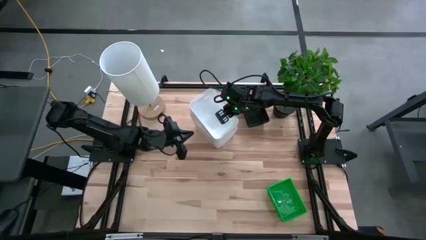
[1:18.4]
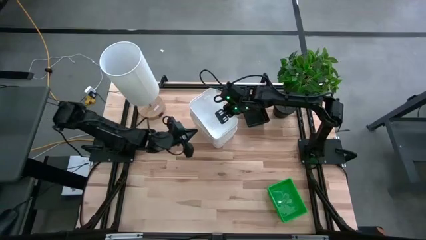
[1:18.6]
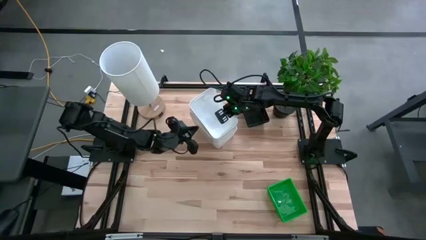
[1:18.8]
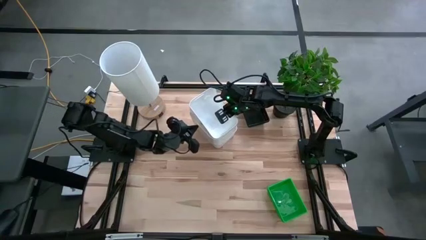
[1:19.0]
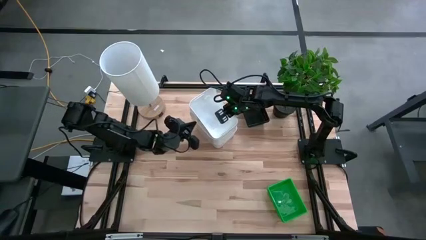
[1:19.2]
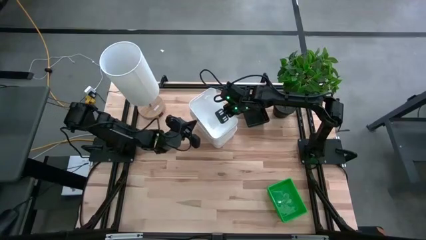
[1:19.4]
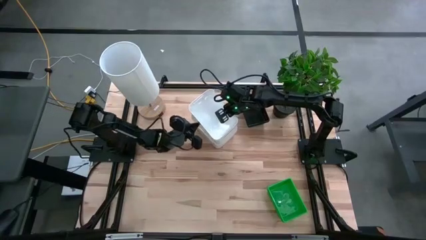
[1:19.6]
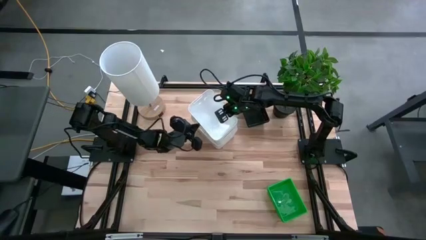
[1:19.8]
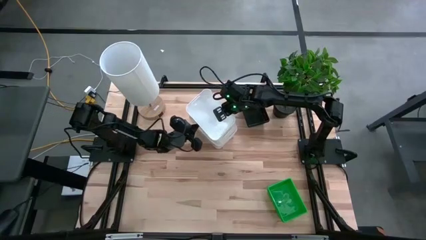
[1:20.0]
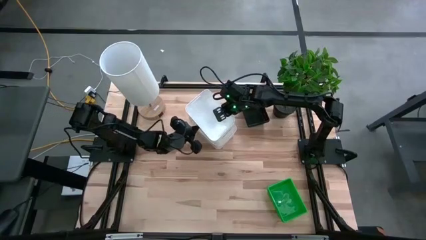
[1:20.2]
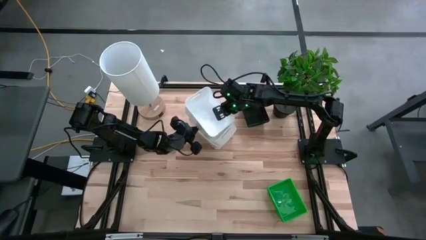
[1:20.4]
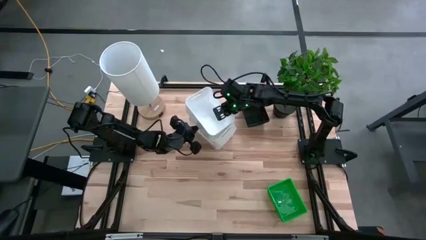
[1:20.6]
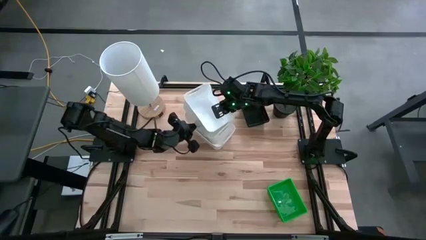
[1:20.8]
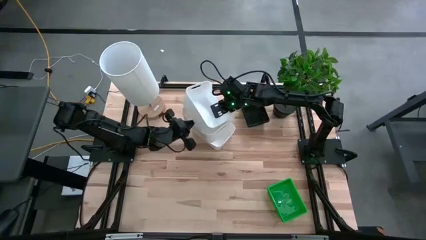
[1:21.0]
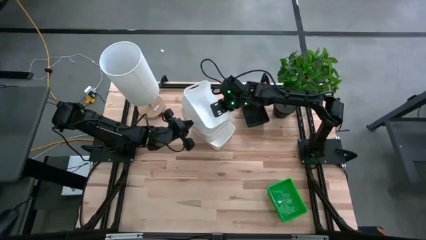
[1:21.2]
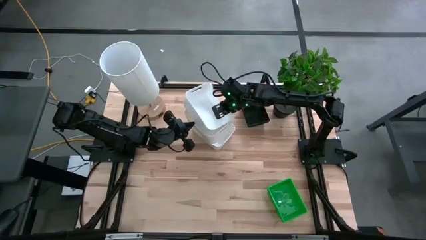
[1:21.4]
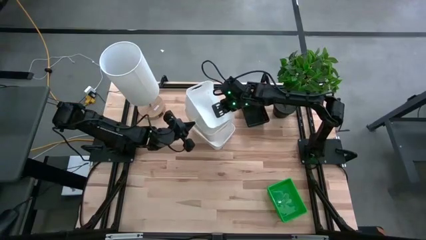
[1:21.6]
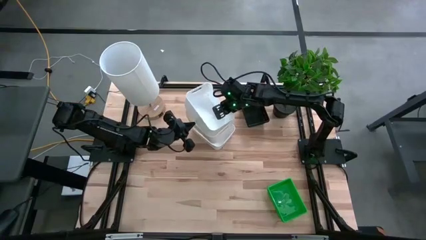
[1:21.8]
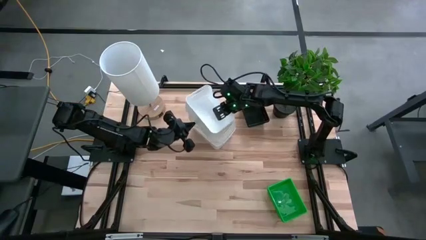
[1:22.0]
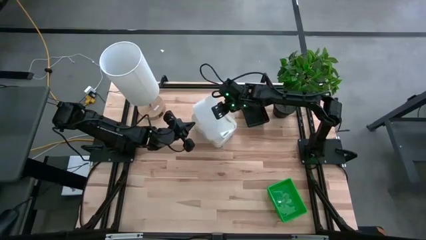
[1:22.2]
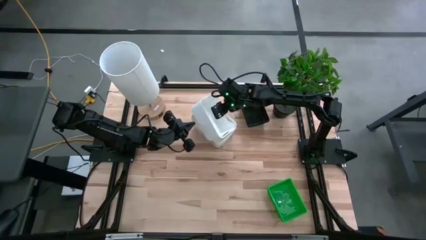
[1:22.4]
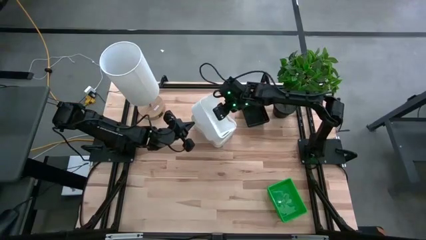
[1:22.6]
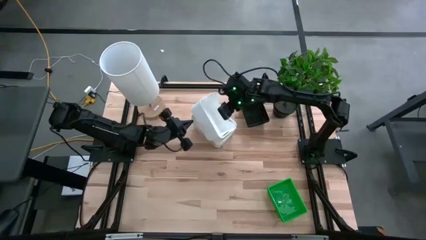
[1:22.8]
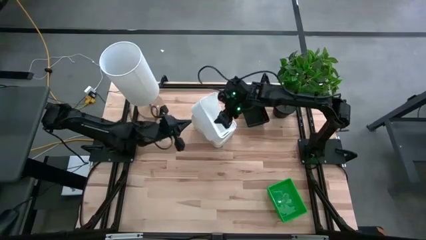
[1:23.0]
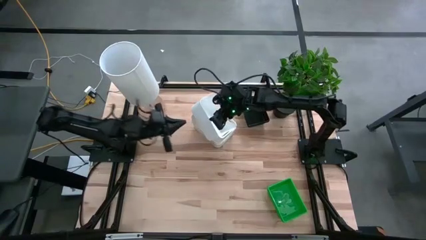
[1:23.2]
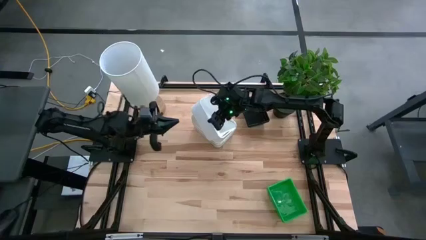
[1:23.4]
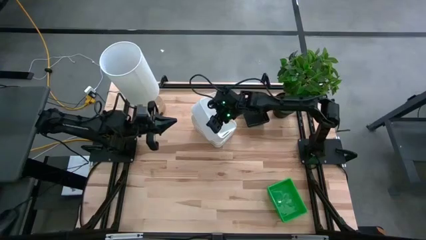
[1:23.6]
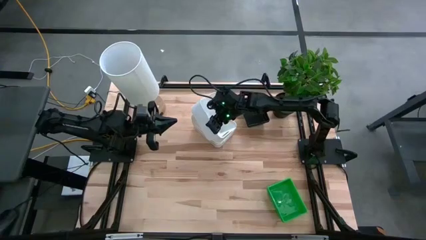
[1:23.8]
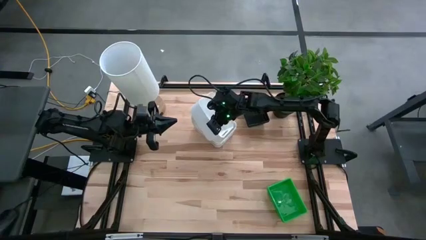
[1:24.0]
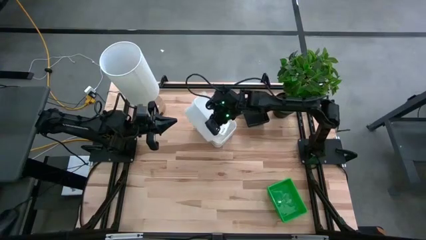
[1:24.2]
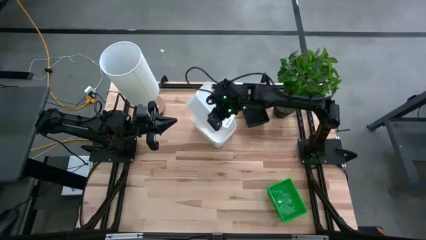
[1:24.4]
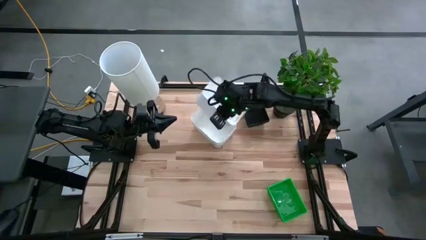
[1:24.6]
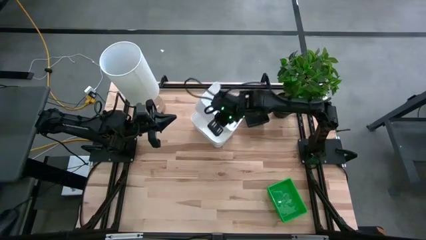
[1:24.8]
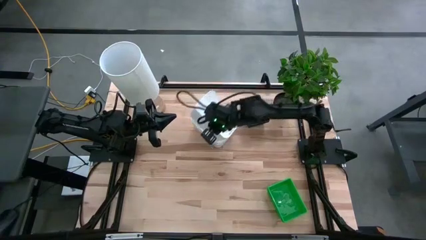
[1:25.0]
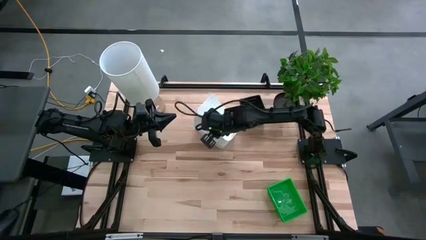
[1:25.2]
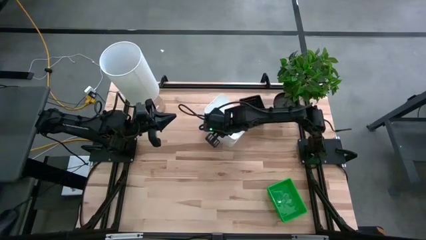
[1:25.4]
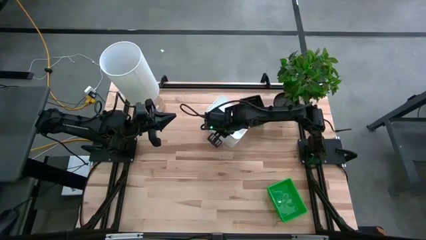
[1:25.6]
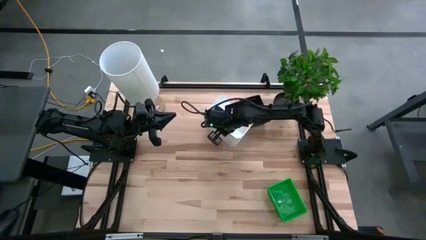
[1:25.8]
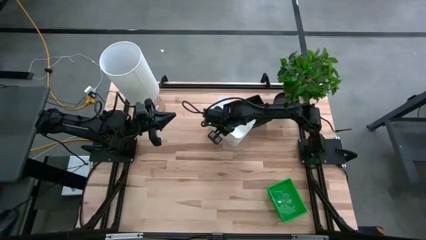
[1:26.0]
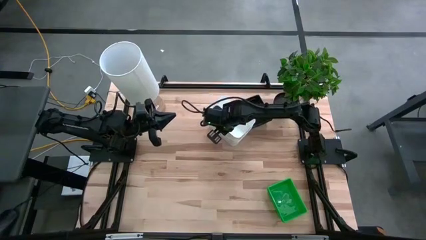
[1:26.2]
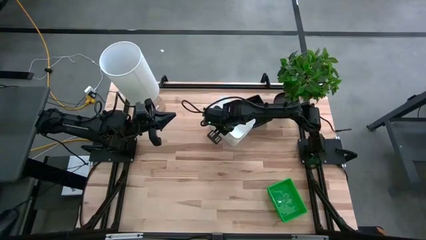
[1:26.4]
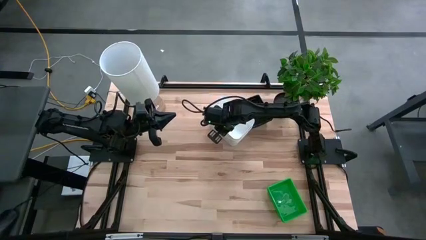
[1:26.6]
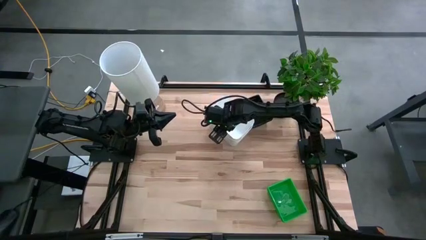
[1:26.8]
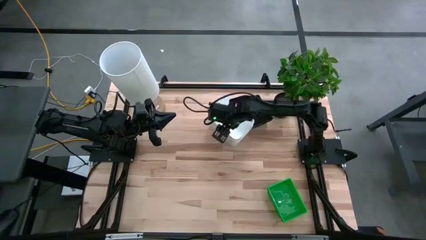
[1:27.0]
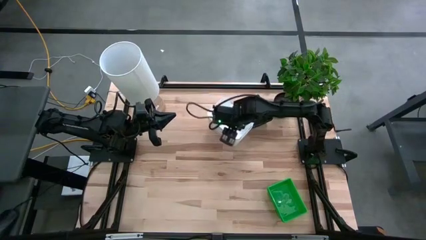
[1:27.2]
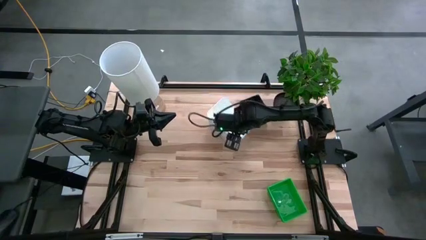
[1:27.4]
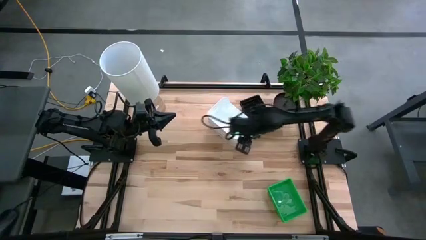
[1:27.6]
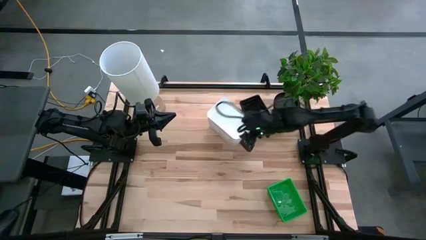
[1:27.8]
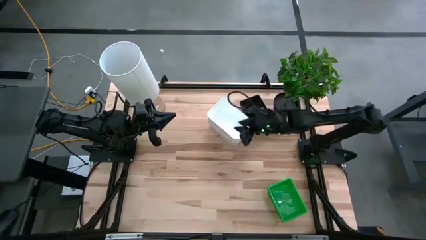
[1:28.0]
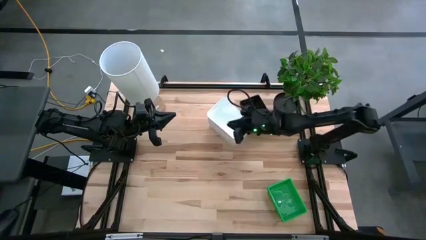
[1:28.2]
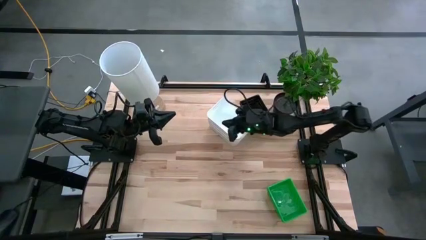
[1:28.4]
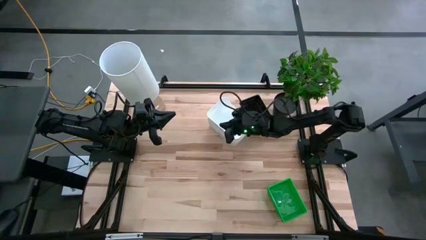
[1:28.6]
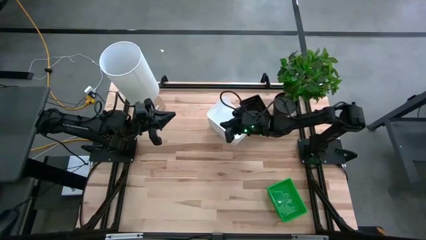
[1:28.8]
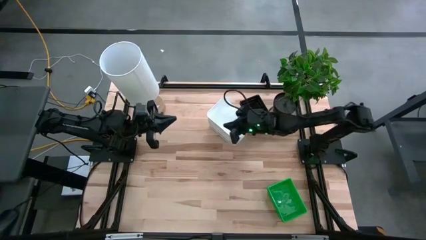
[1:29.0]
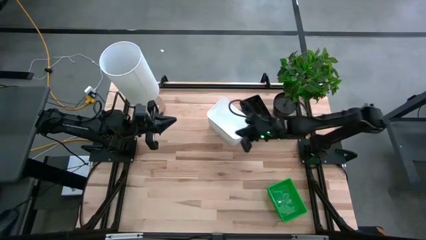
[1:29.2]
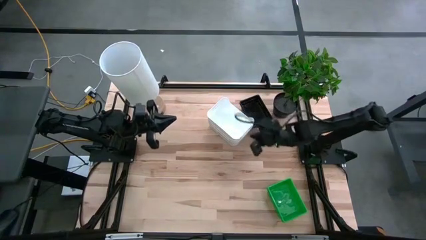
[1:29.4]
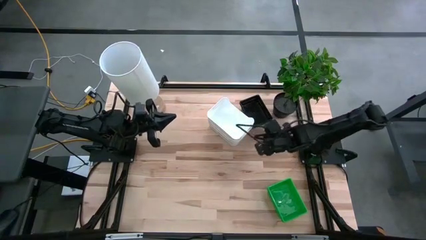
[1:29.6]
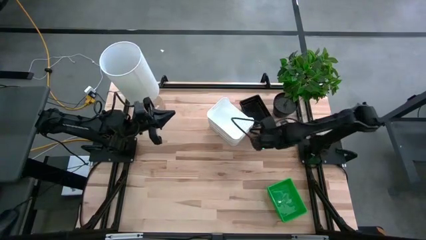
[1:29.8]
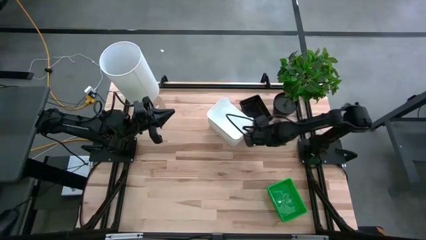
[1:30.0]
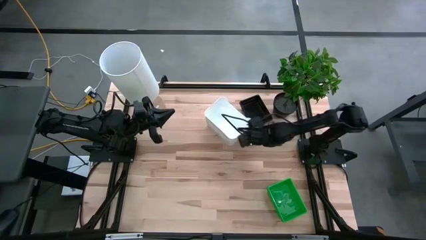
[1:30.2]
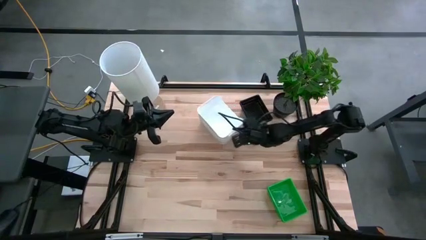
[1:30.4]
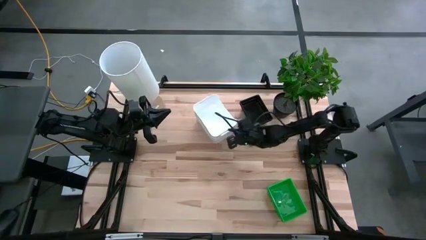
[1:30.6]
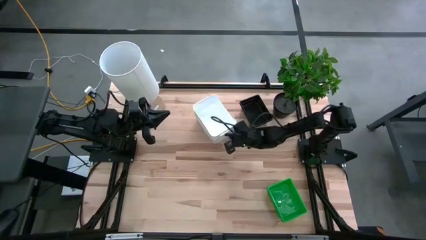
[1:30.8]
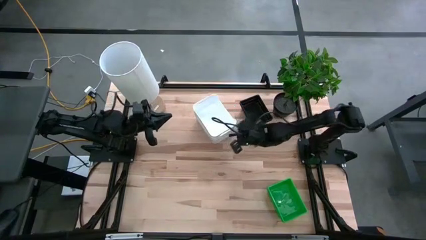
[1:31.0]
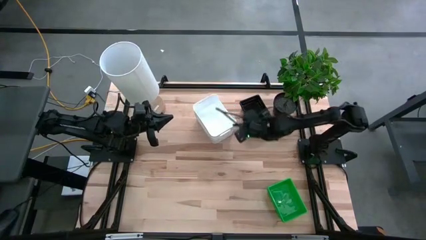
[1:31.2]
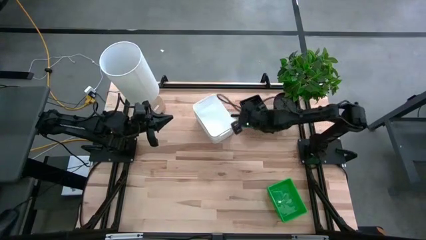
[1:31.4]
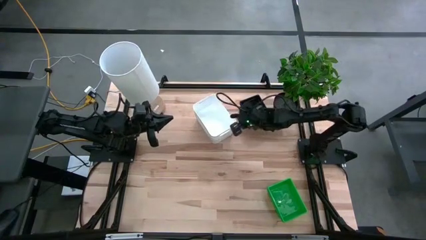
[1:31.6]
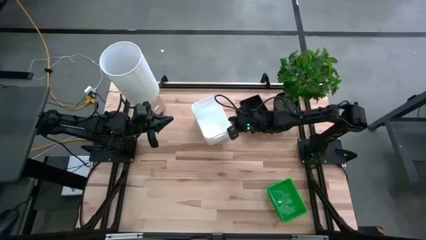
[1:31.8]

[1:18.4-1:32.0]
Stack the bottom white bin on top of the top white bins

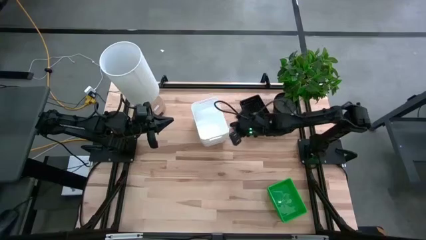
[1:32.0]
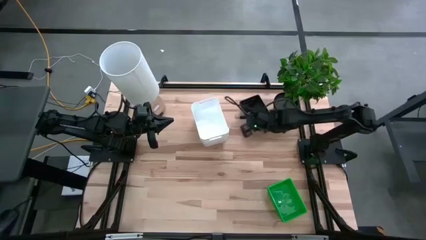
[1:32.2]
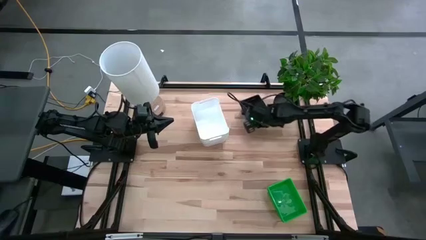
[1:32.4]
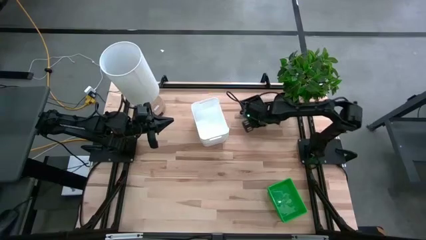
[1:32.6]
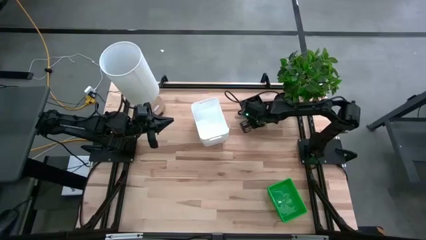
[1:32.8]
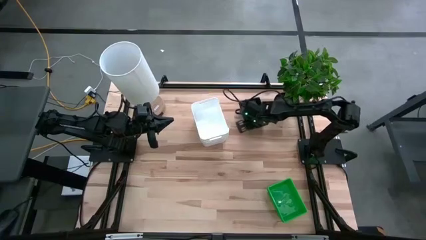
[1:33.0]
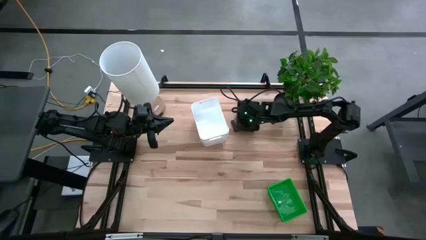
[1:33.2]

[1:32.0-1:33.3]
Adjust the stacked black bins
